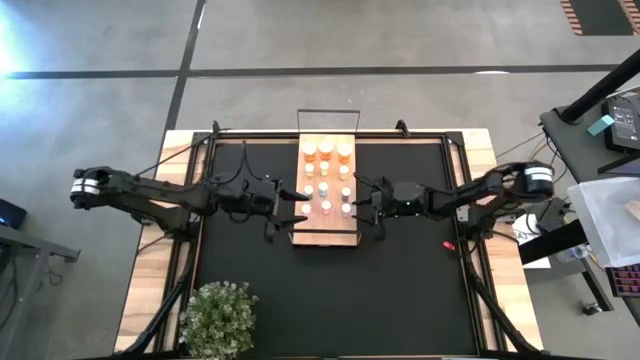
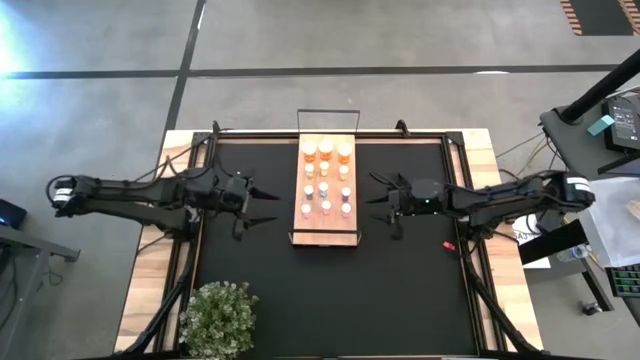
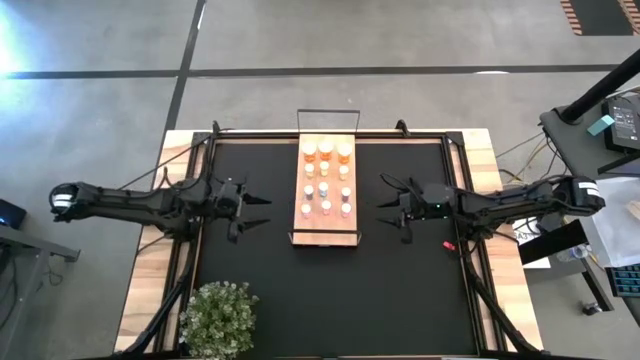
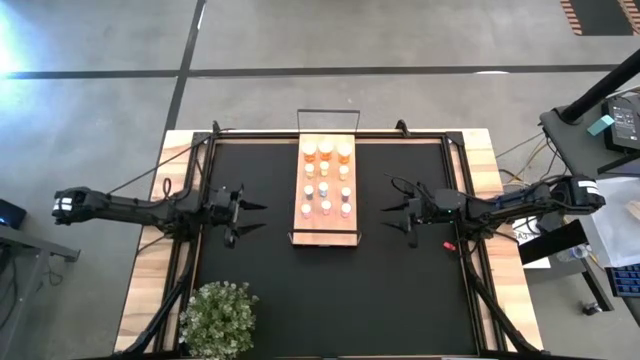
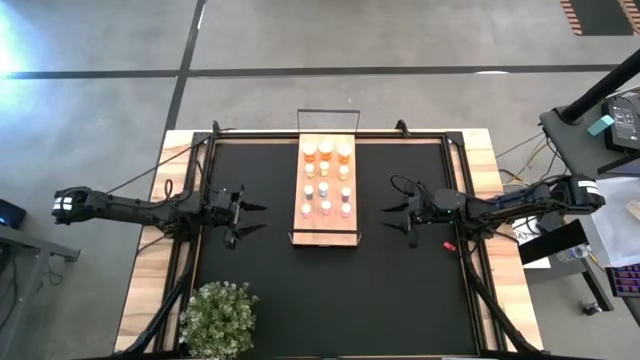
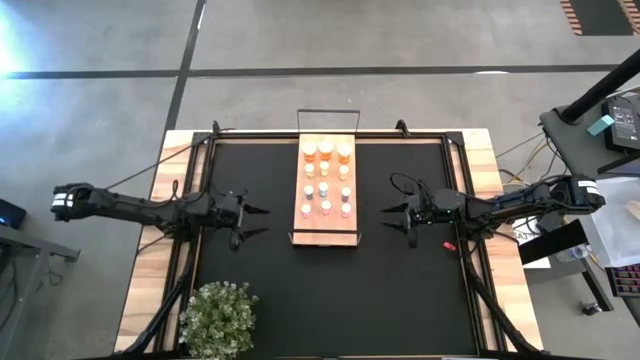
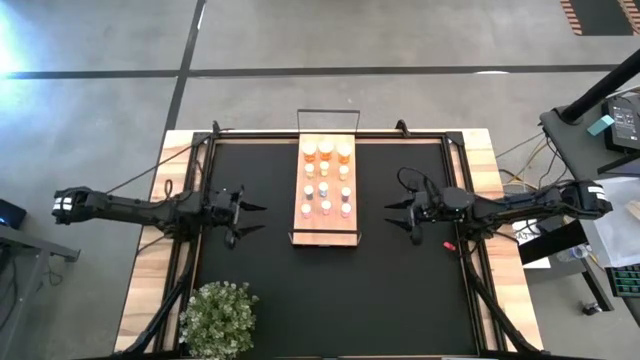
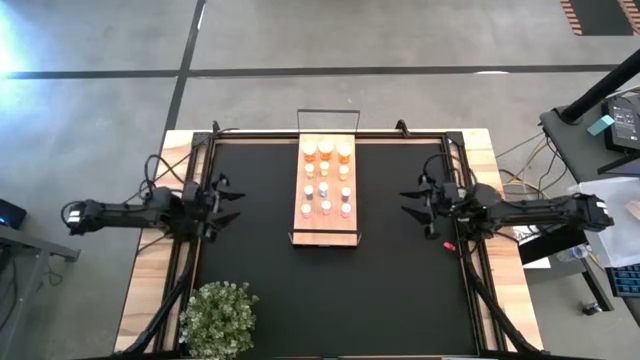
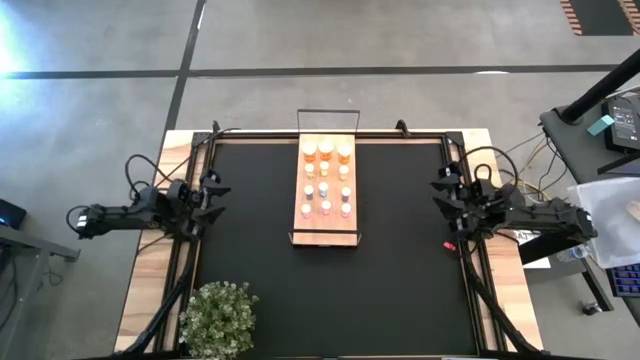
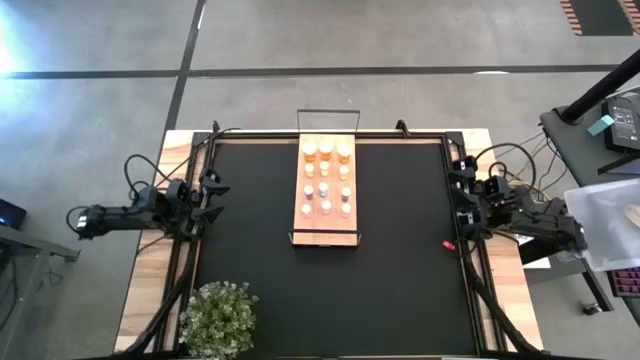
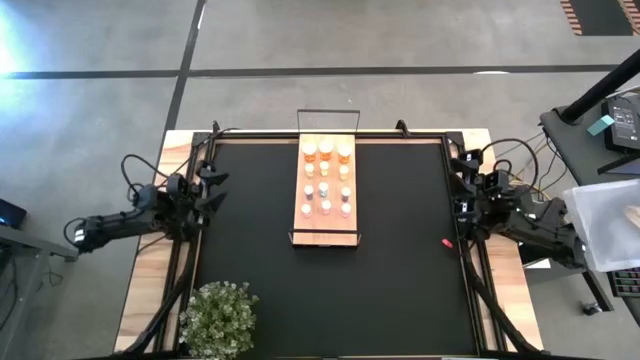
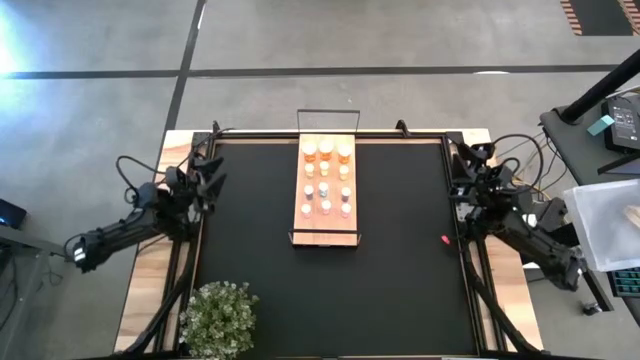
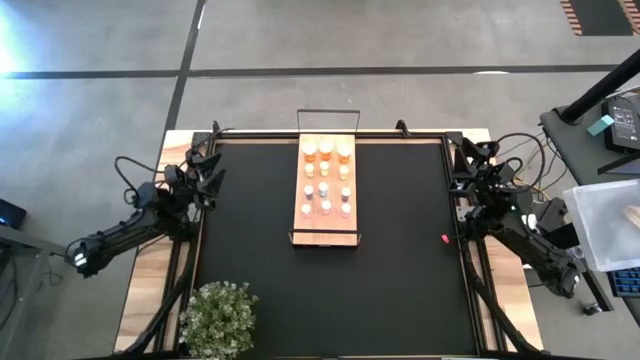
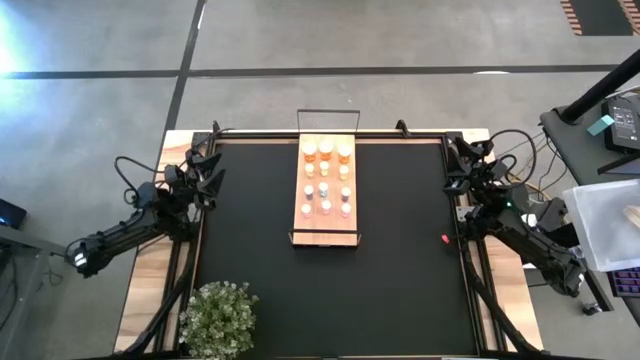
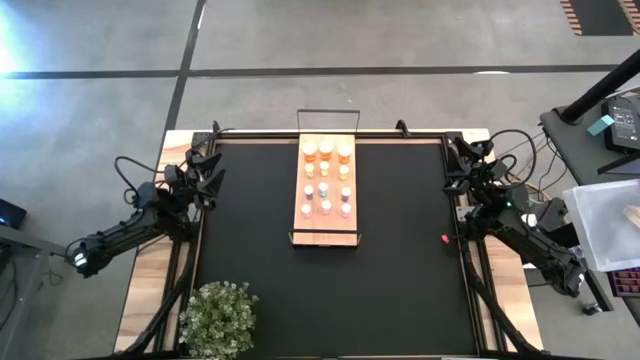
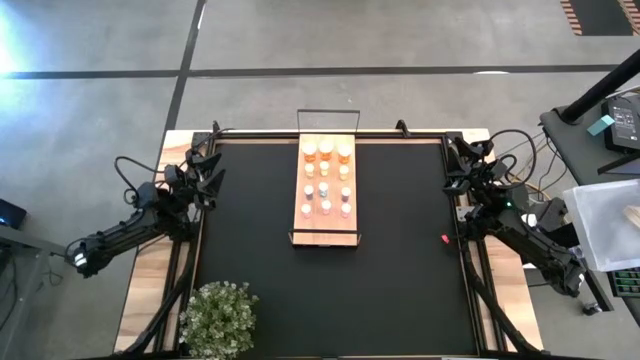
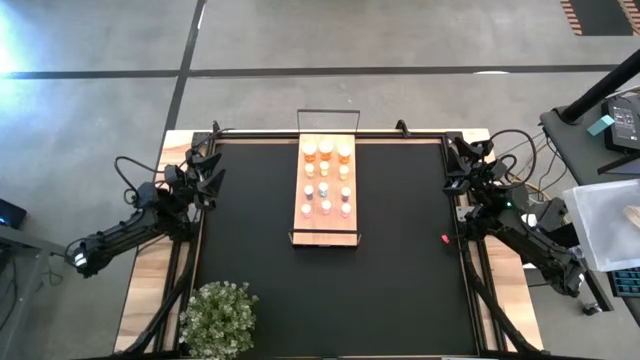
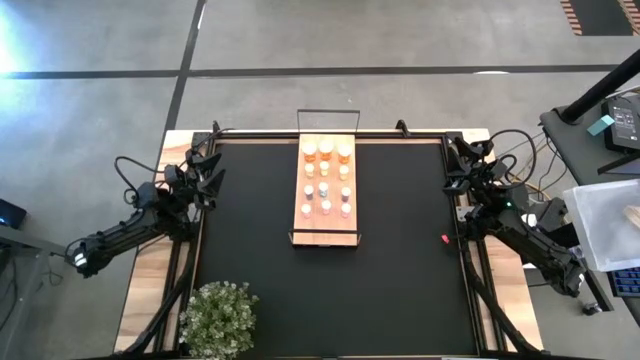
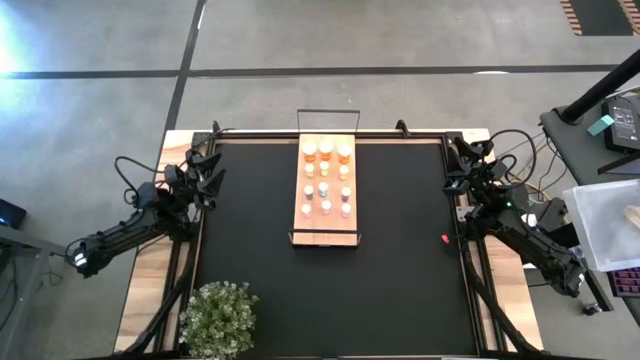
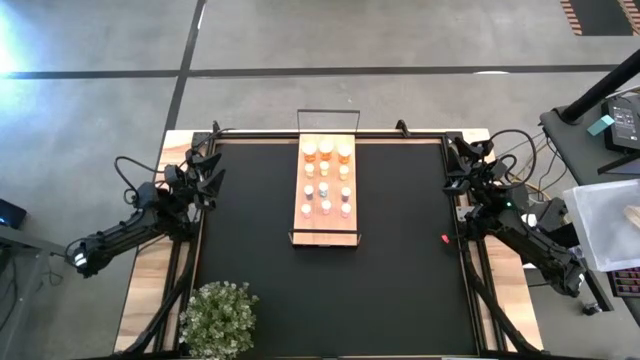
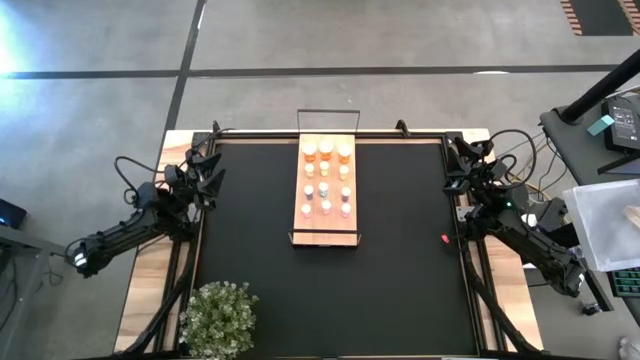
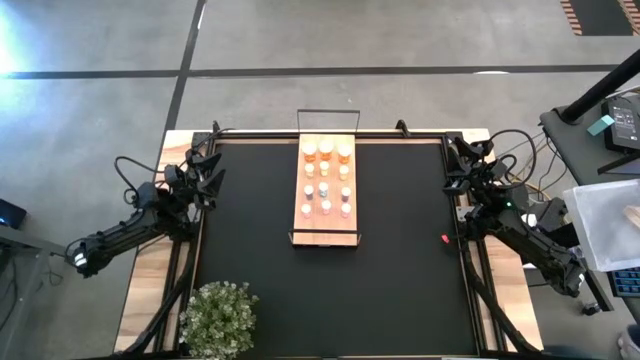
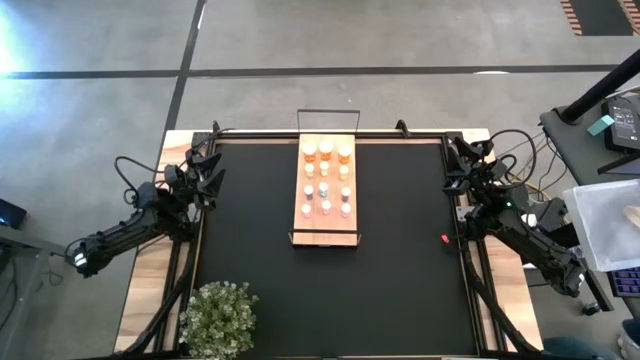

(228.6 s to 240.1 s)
Task: Pick and place medicine bottles onto shelf by color
Return to Home Position

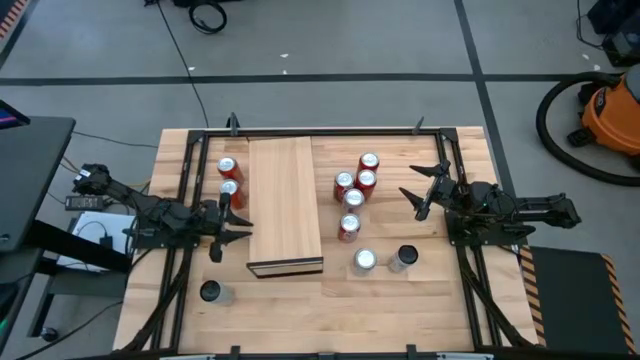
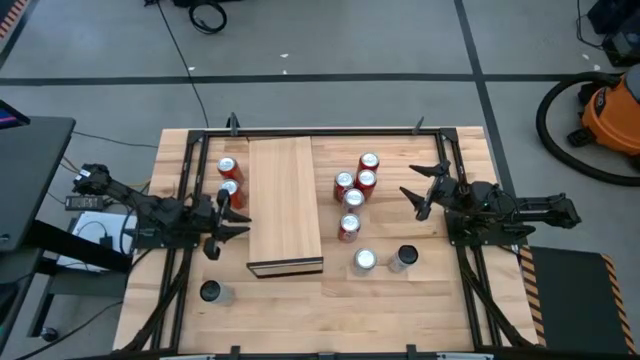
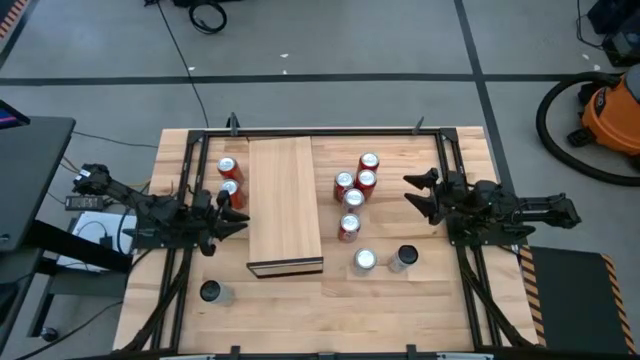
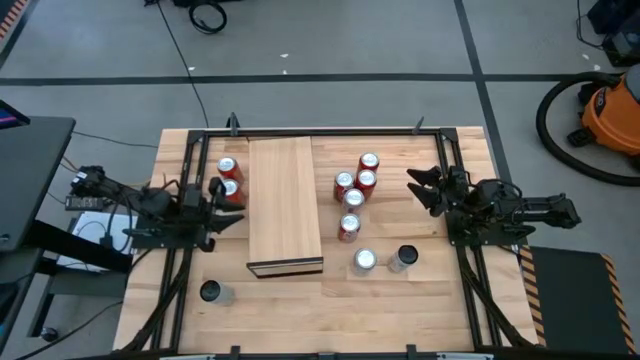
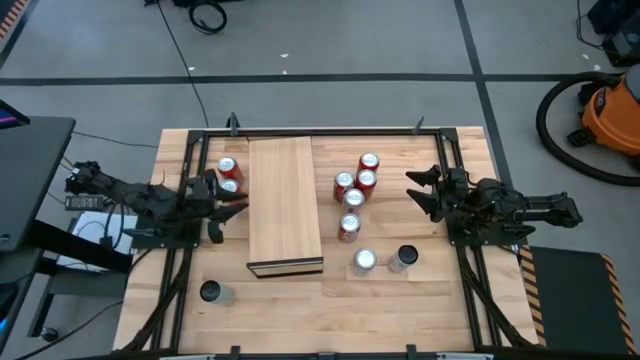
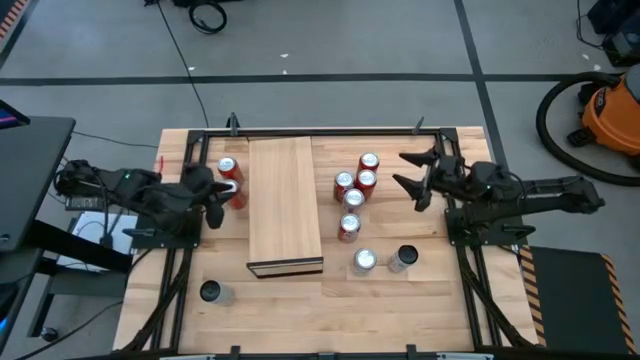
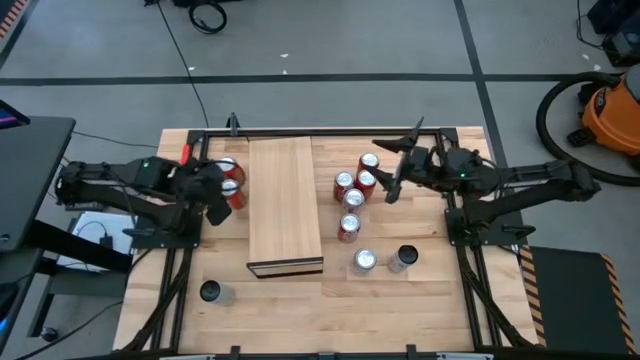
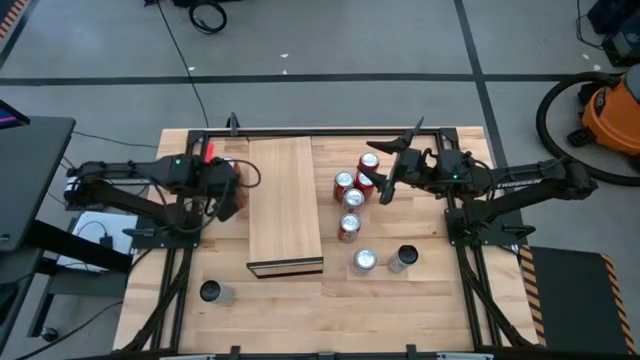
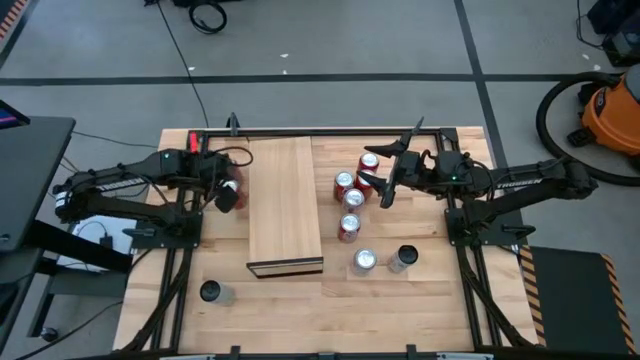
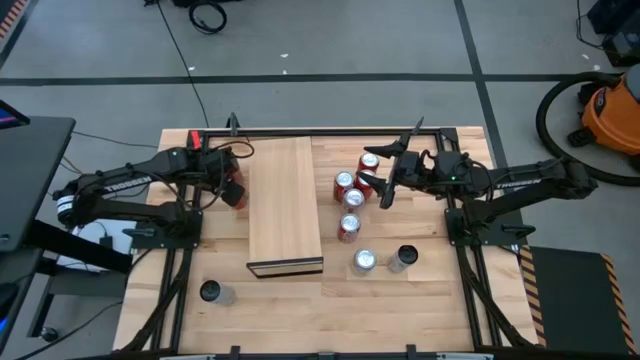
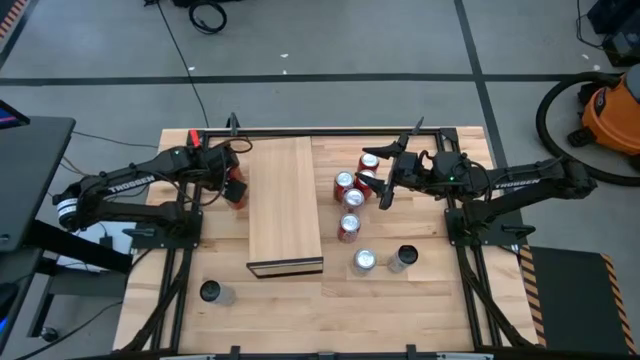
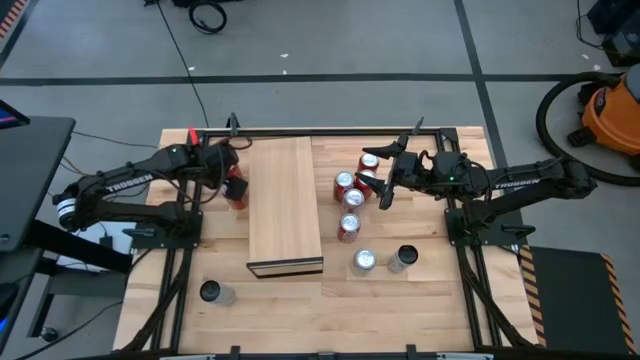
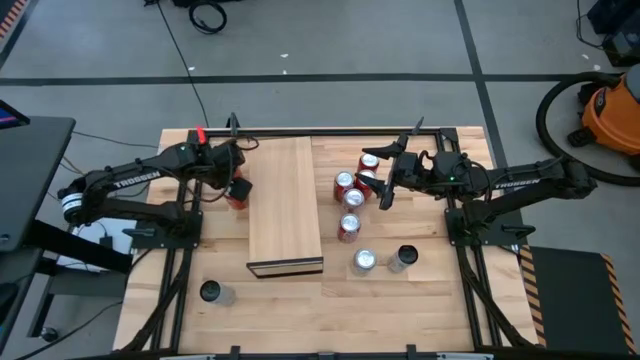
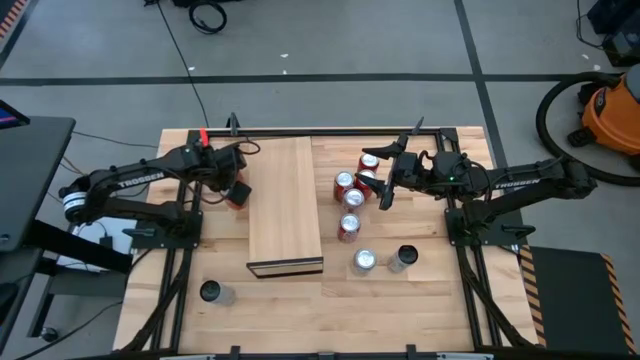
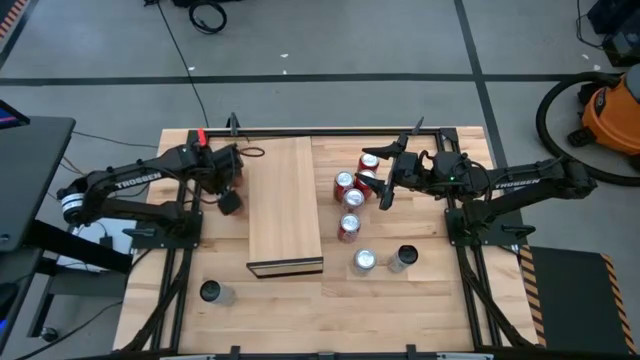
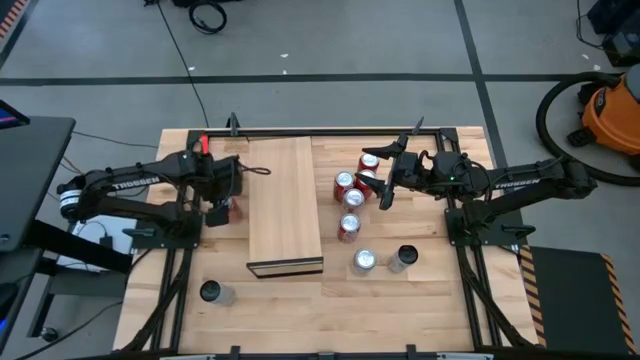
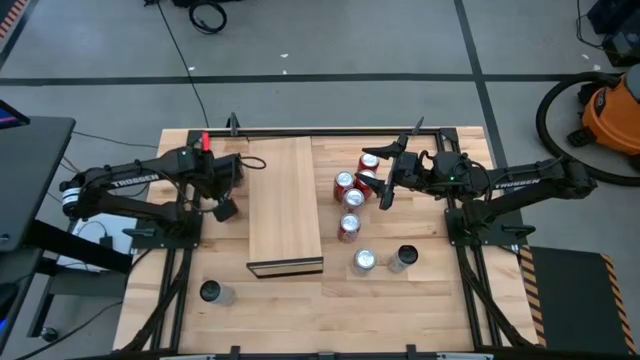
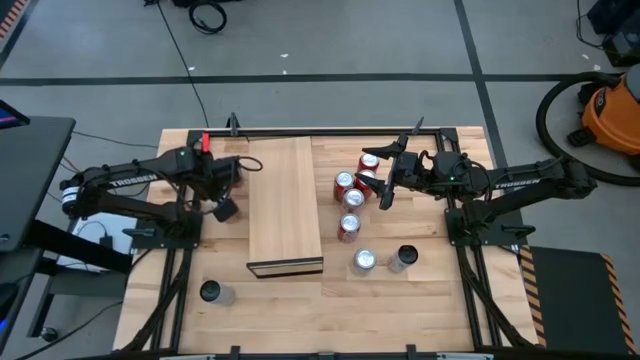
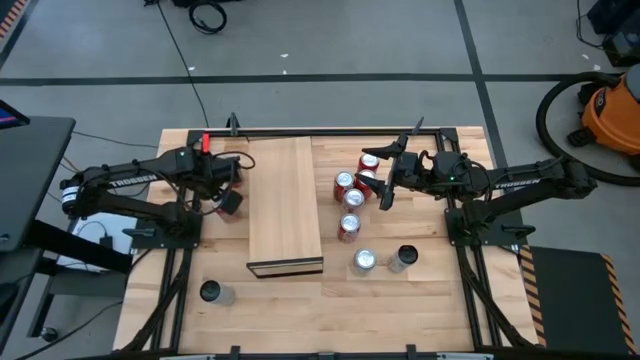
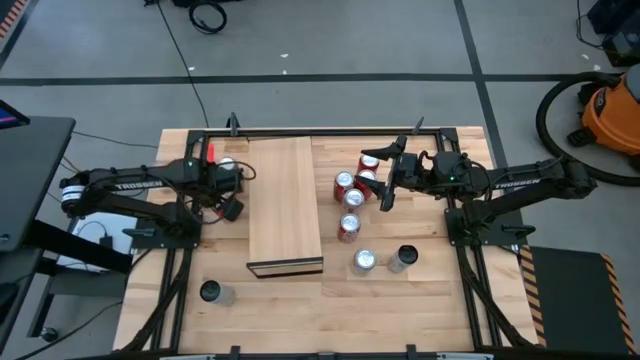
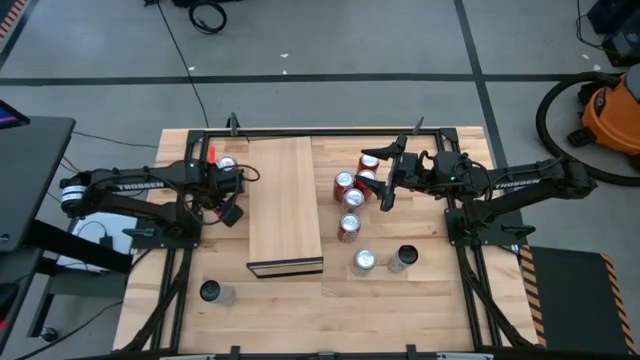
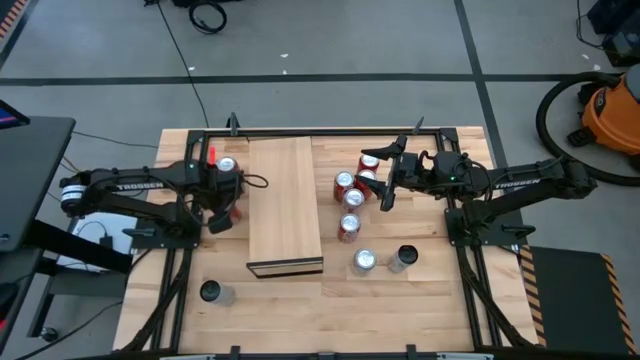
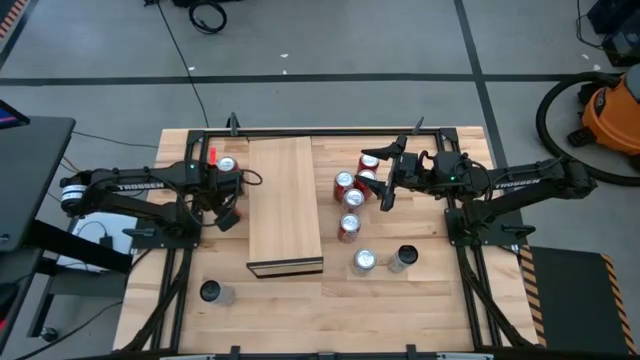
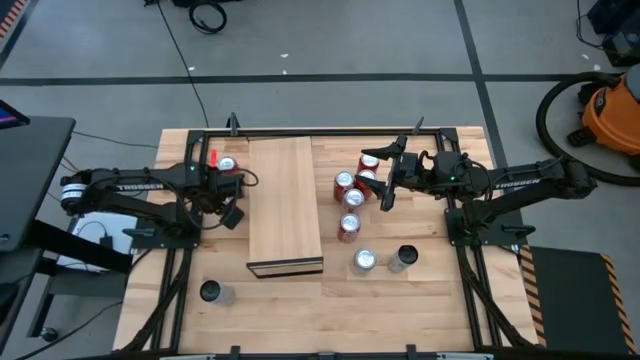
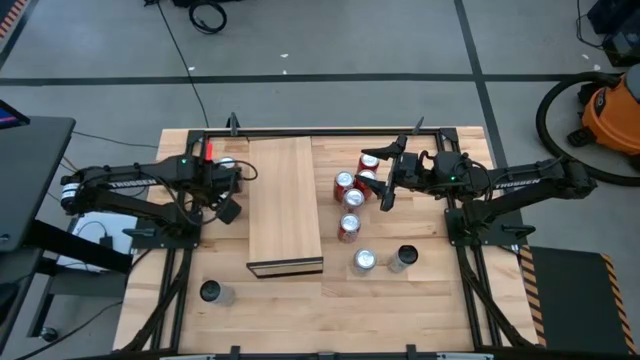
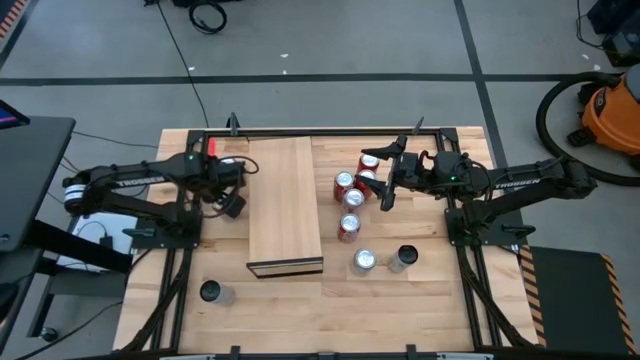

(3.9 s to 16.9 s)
Task: Place canned beverage on shelf
Put the bottom orange soda can on the shelf
